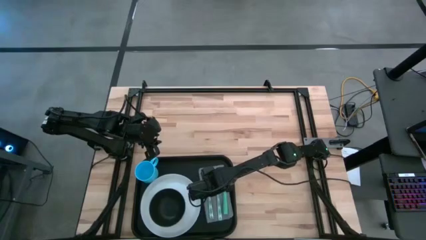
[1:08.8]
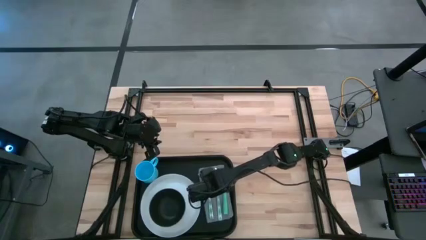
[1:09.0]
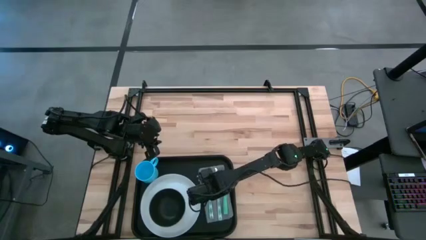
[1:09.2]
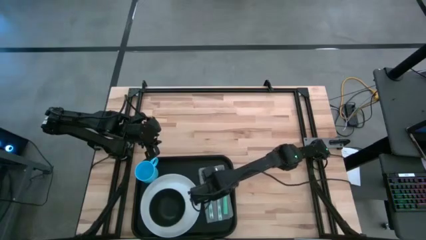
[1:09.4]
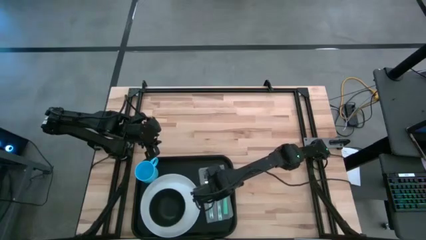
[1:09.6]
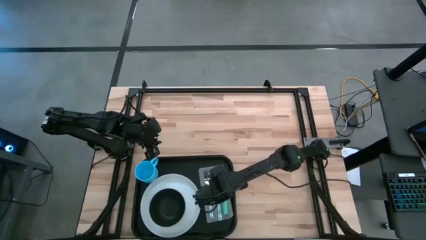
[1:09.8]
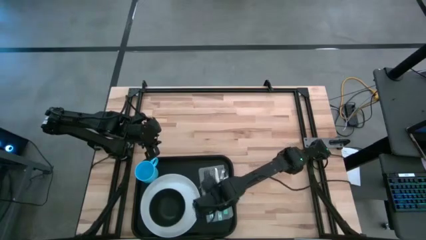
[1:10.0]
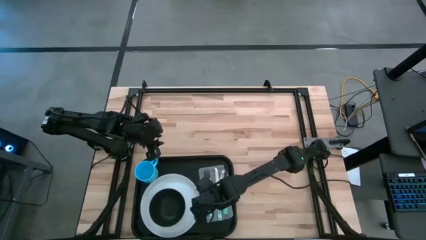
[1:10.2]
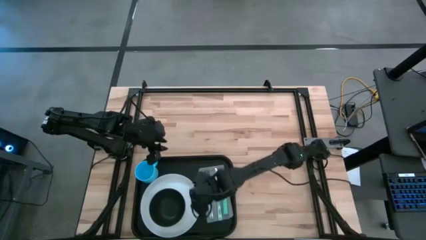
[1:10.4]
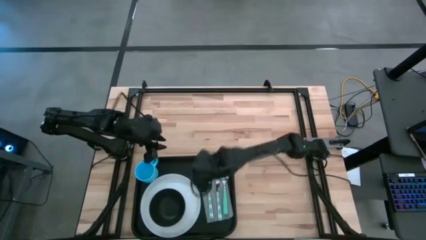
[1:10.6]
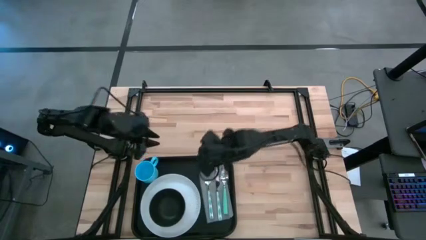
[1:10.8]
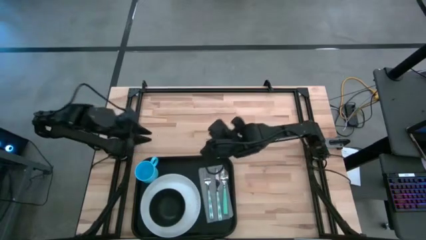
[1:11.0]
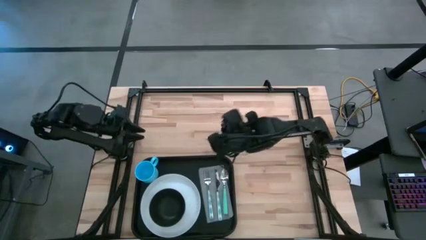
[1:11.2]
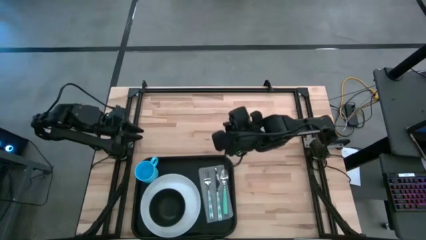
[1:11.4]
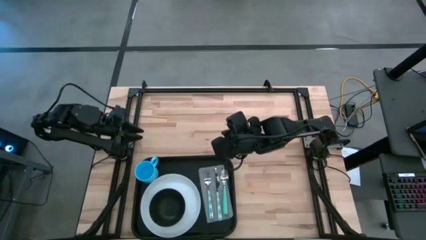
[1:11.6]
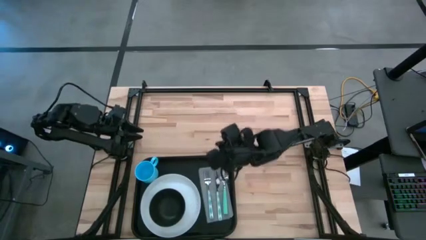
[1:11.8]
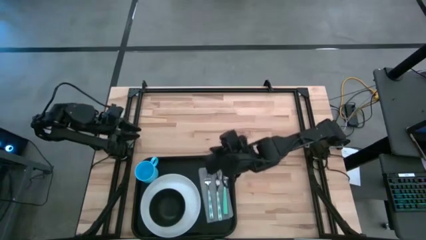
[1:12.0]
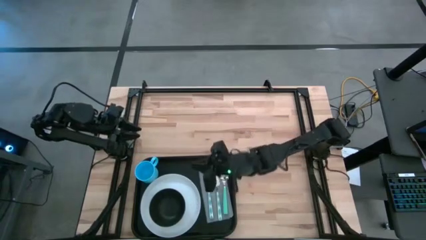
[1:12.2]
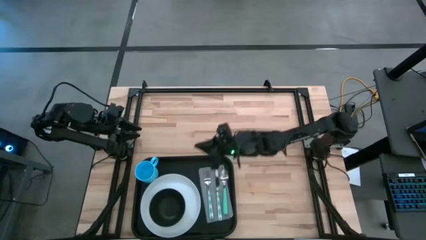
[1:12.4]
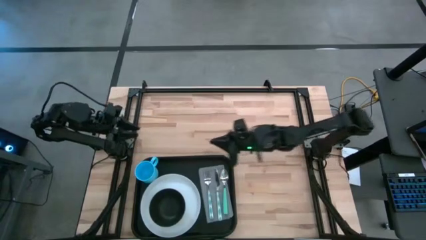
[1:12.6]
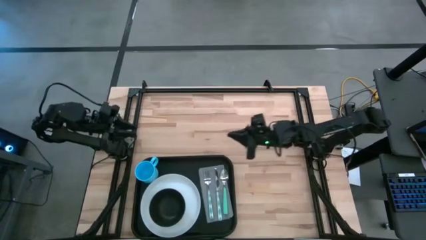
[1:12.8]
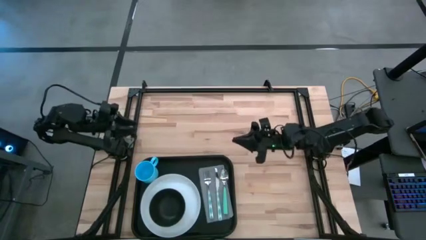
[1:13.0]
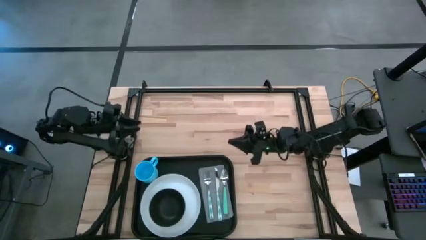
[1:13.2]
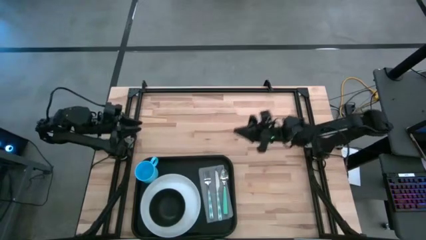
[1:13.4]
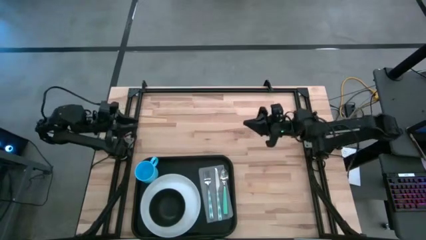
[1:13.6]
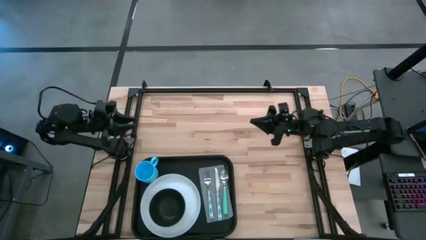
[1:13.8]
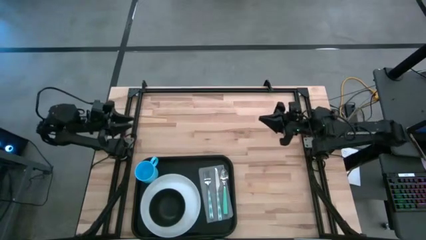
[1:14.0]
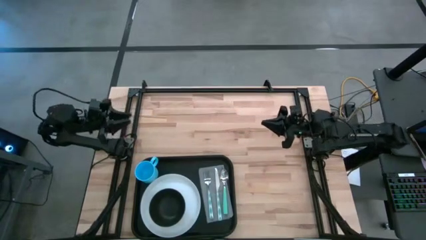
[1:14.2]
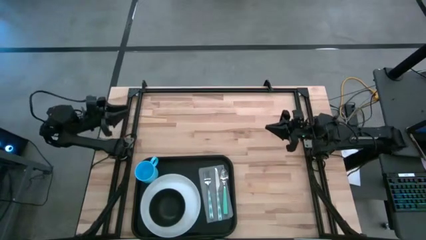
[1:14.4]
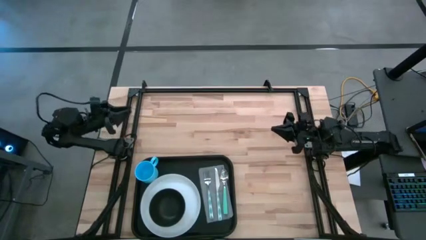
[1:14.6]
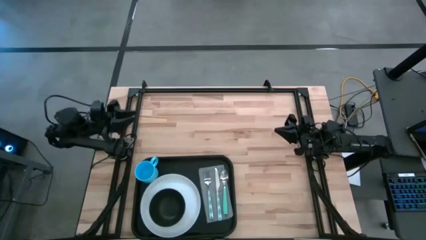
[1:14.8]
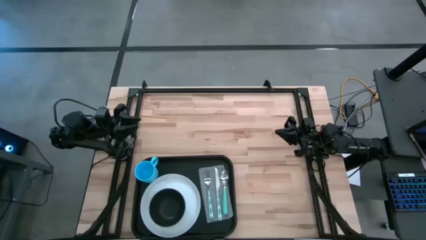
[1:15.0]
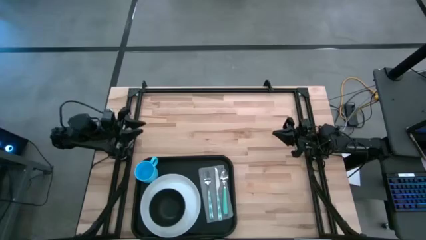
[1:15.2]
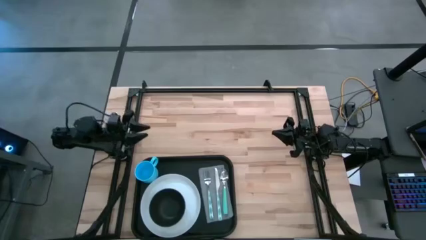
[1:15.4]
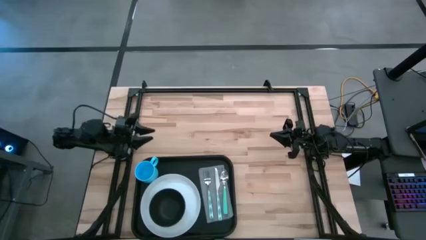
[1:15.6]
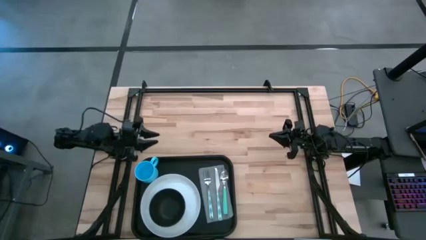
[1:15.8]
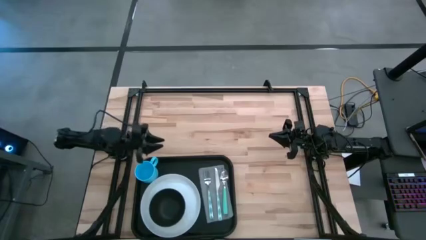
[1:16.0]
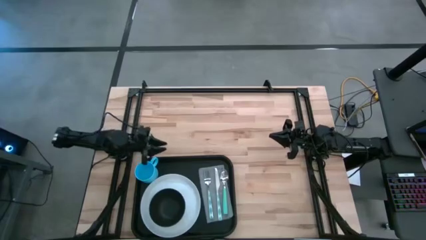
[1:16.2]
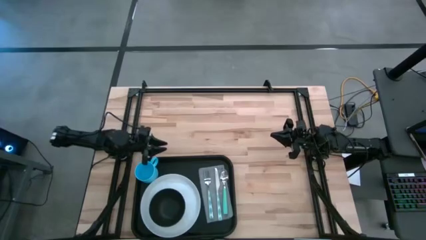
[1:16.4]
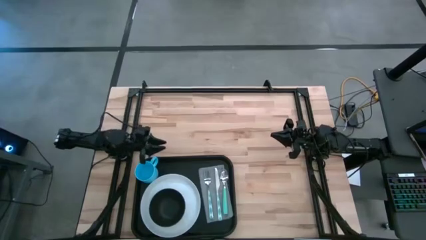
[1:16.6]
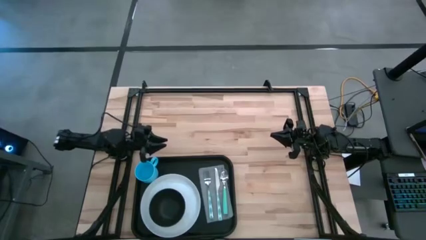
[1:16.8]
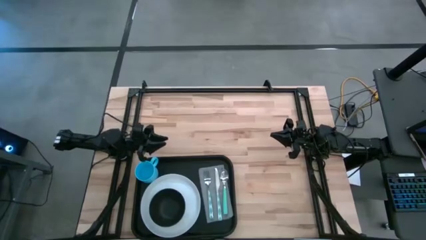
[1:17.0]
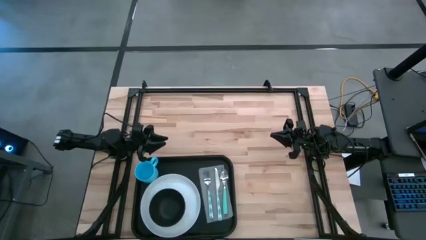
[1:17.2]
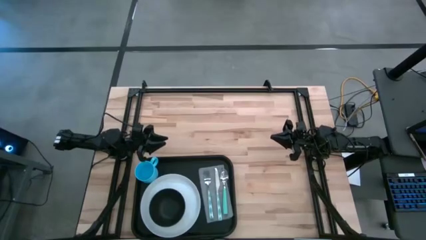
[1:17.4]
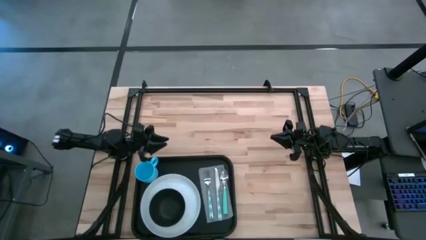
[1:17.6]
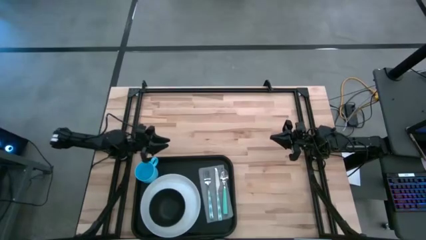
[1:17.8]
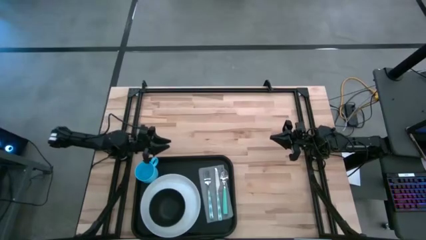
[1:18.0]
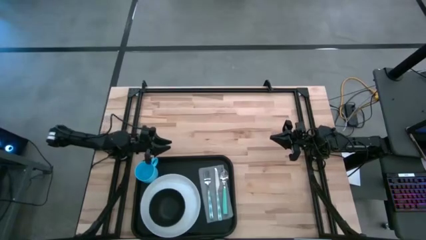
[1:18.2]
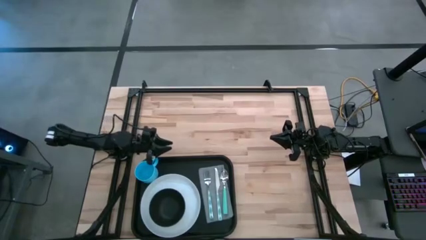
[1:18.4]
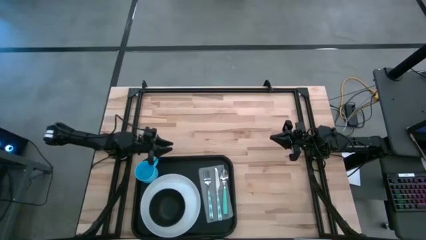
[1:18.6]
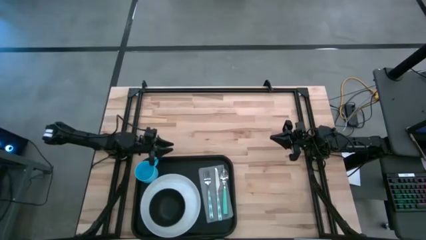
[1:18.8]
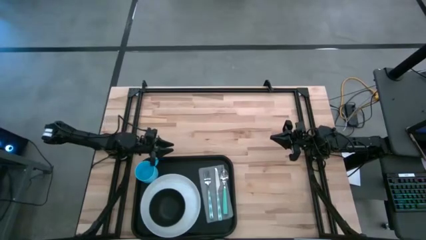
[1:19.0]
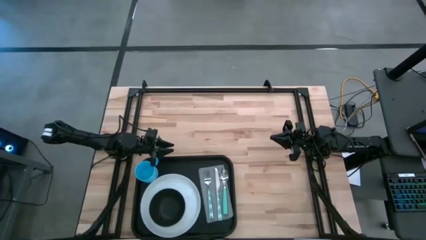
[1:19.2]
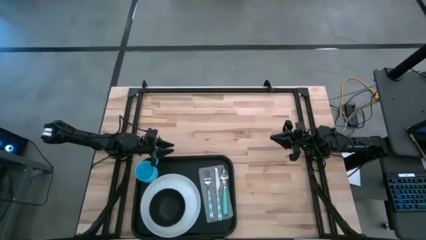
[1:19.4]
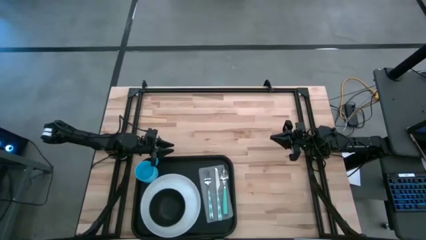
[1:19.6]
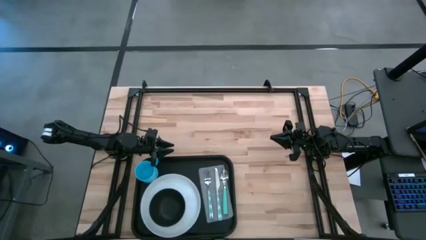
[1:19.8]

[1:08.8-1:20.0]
Task: Set up tray
Return to Home Position

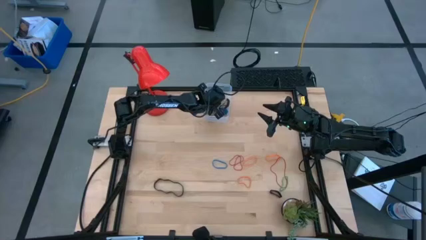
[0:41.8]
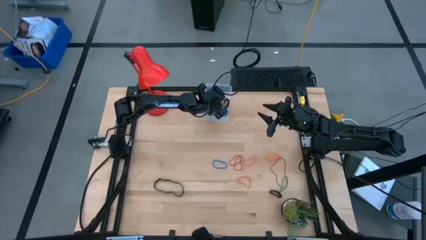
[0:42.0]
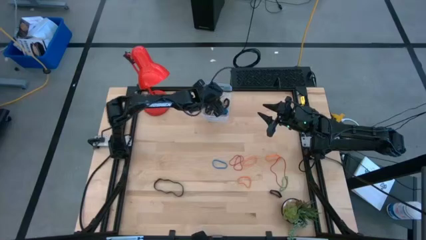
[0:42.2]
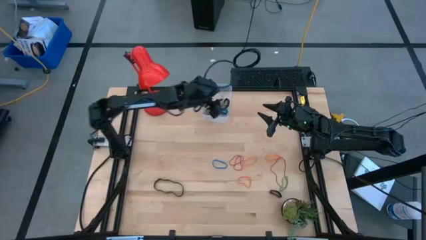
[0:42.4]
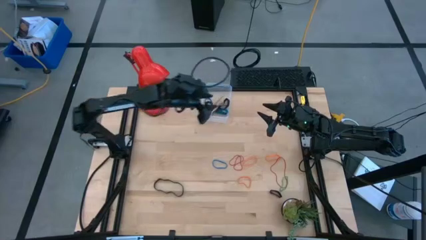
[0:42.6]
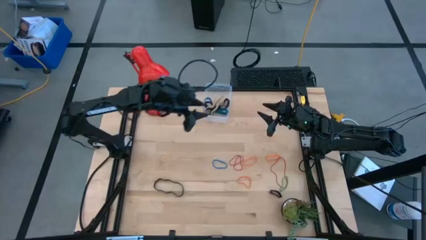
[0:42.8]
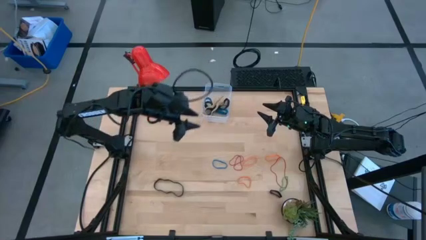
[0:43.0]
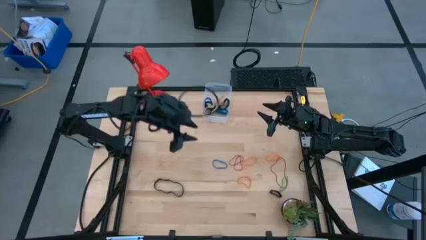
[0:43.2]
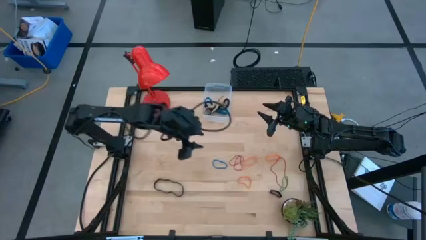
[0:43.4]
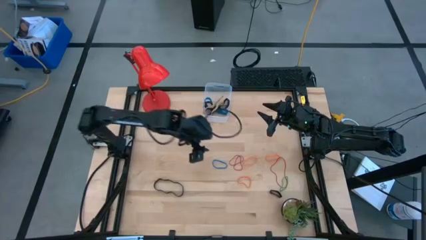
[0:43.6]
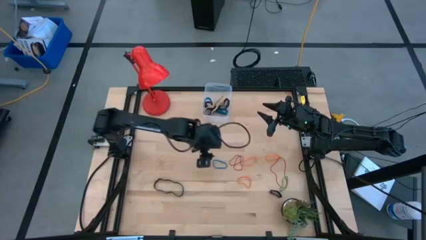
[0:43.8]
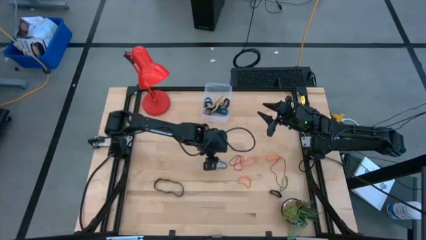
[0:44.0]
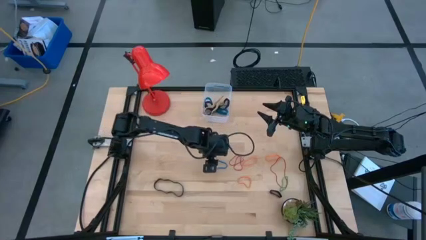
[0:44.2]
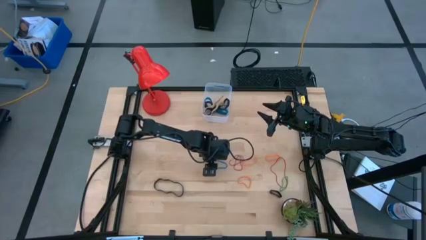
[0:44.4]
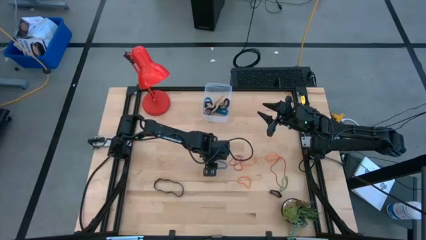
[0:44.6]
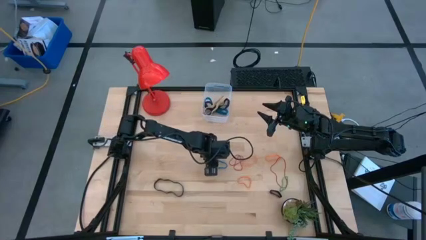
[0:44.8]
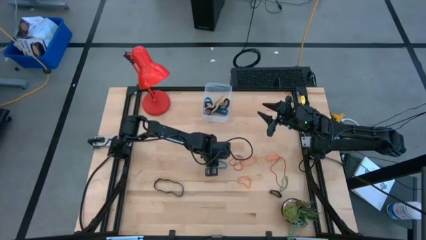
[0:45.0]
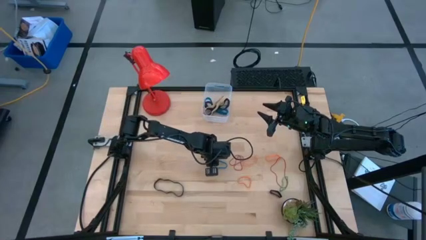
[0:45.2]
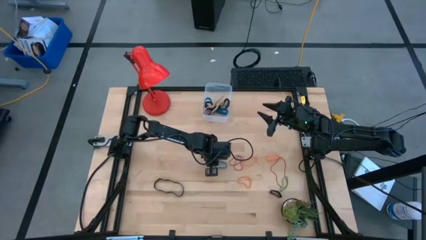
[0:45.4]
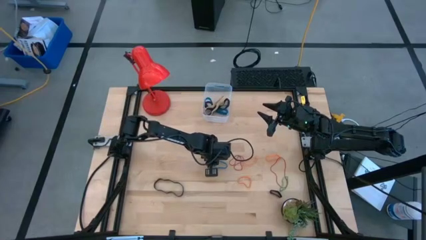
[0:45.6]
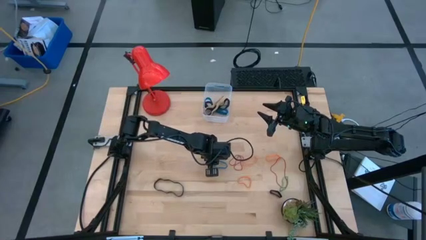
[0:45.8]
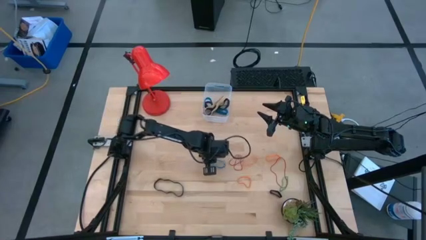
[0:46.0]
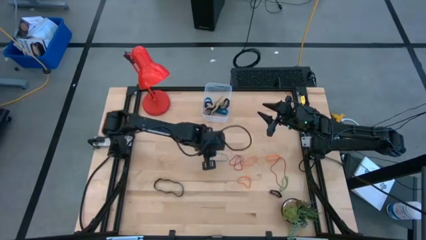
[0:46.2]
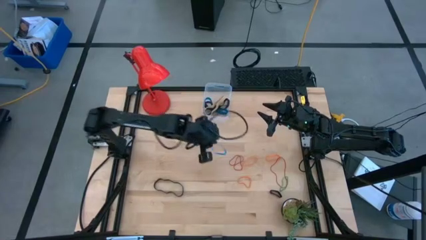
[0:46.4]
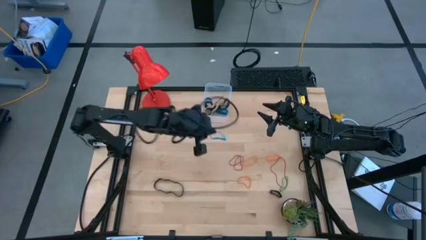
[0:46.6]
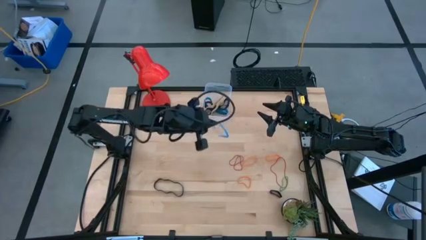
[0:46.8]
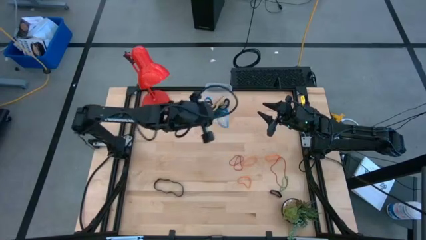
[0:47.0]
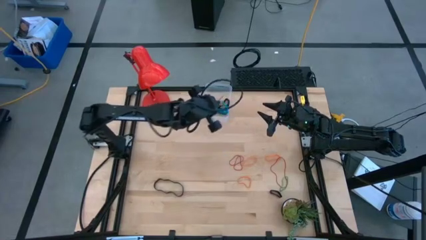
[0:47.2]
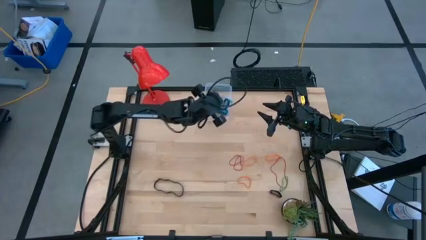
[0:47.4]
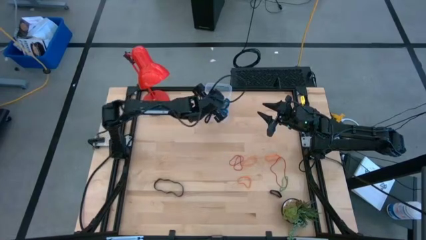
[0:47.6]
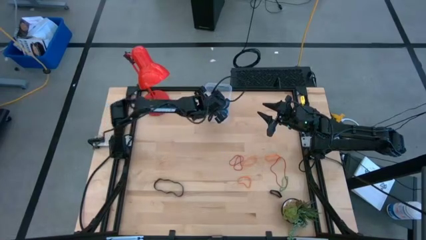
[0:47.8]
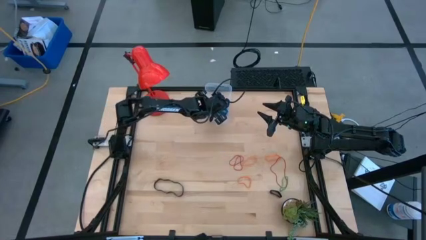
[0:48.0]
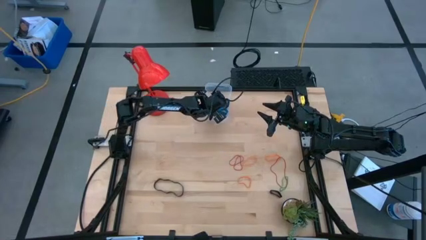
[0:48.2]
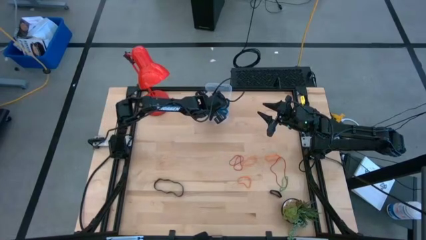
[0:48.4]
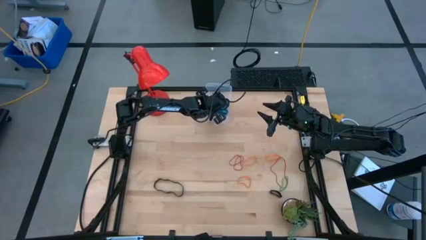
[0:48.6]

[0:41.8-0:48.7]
Task: Pick and place rubber bands into bin
Put the light blue rubber band into the transparent bin
